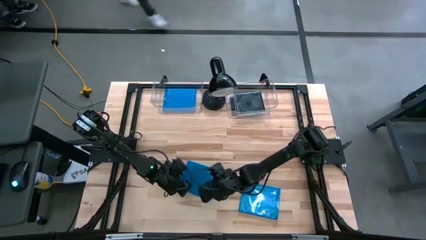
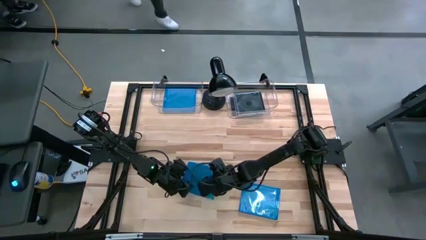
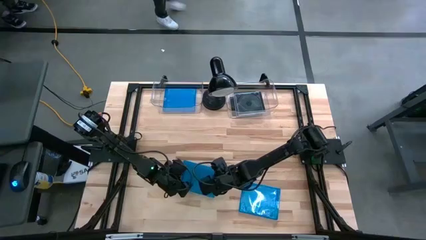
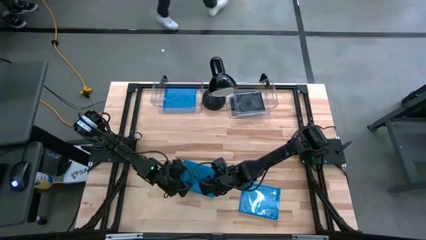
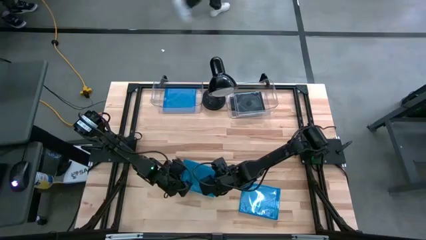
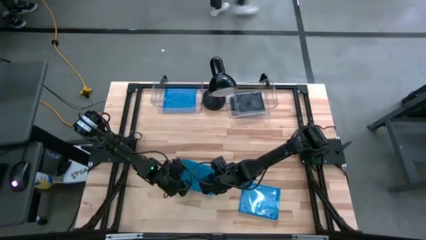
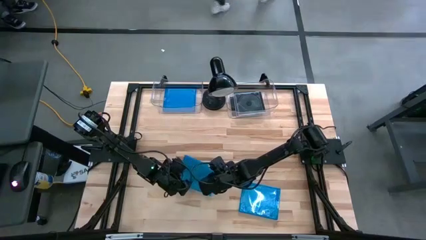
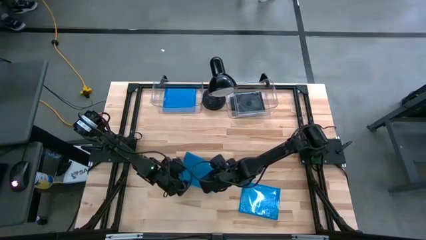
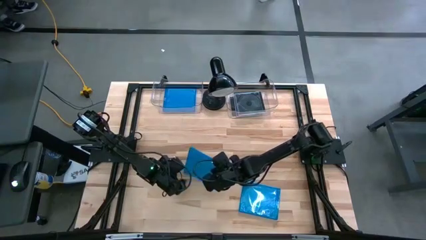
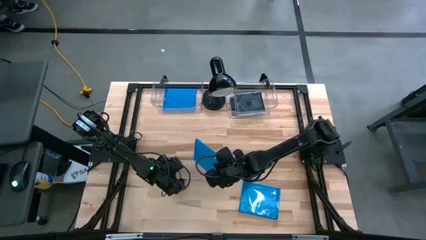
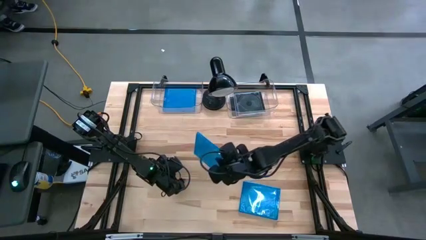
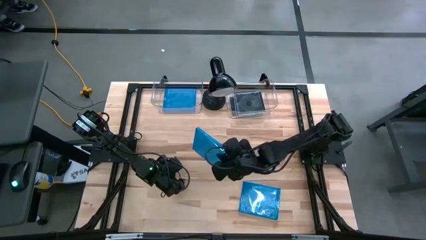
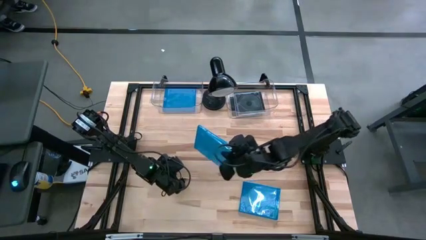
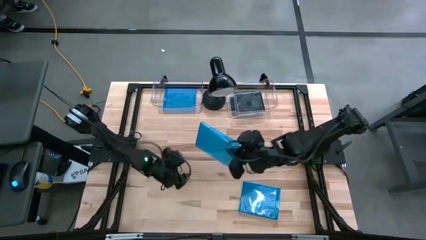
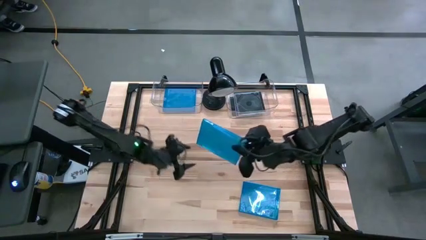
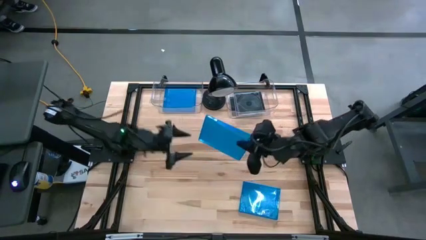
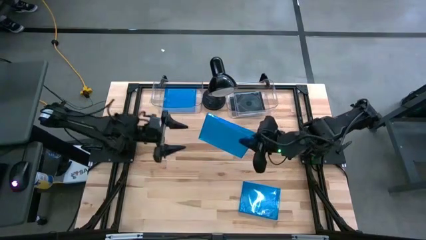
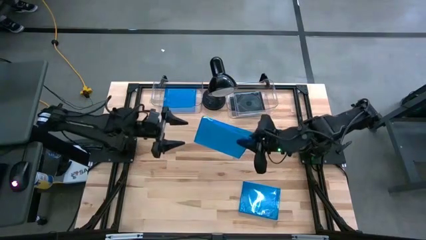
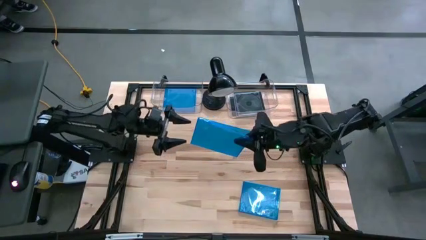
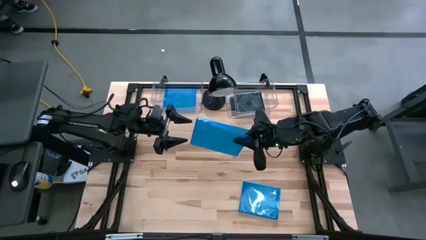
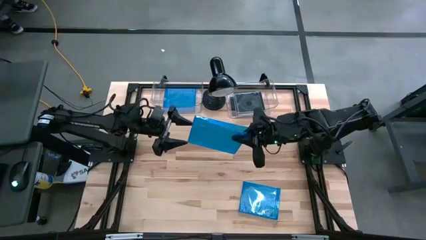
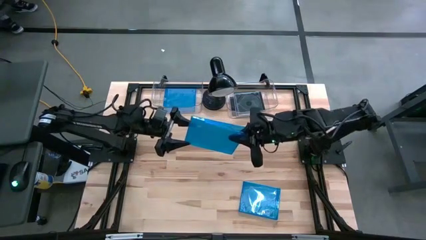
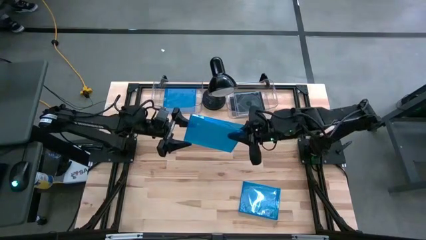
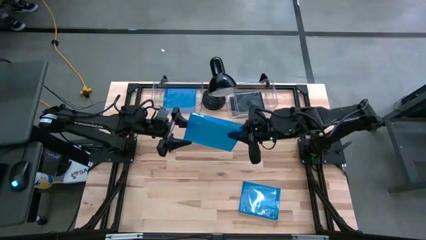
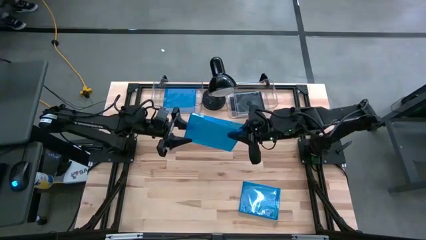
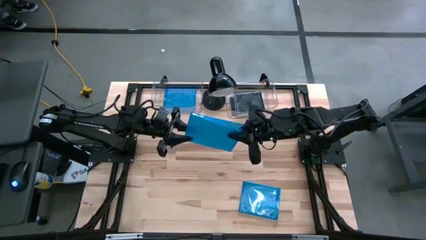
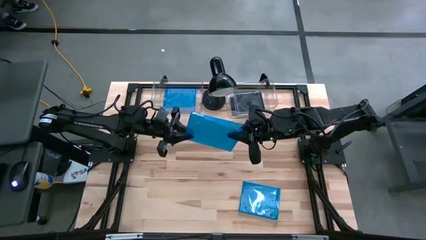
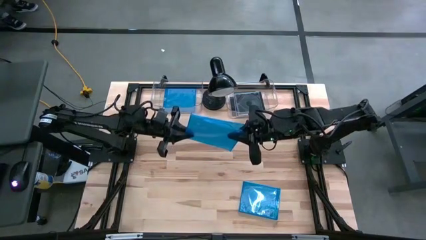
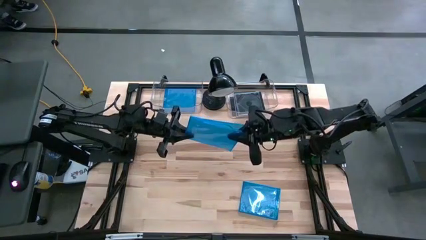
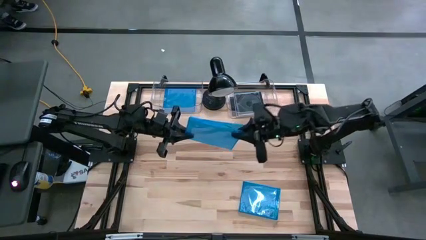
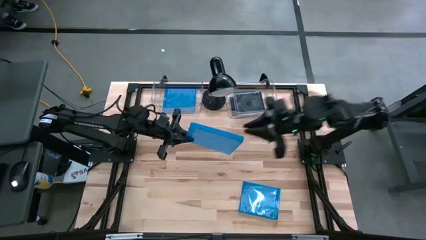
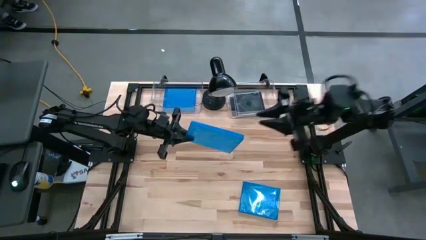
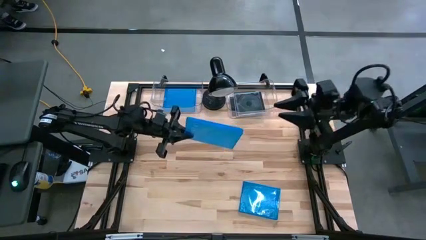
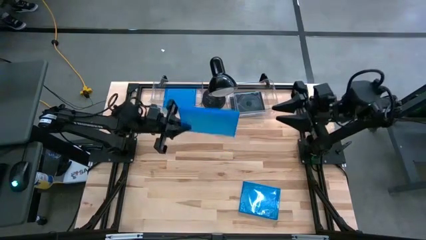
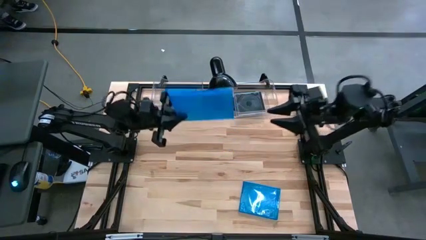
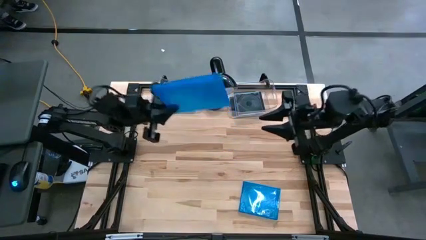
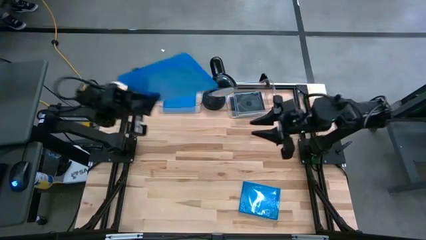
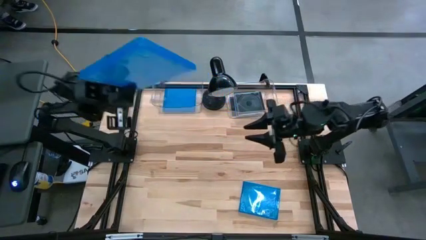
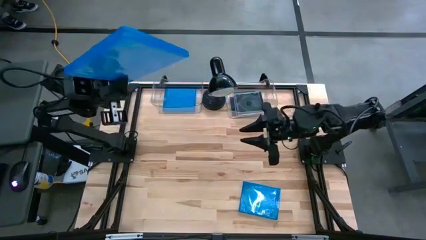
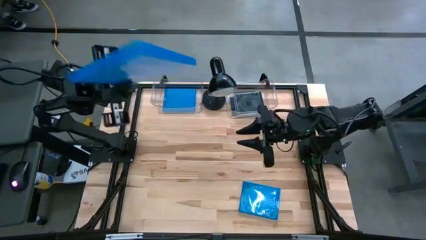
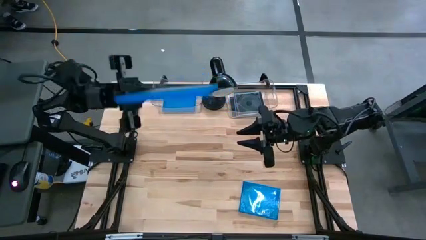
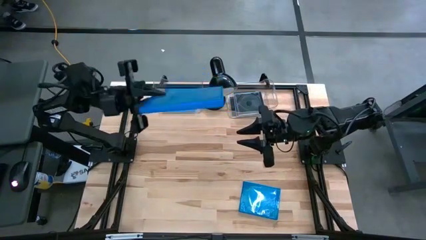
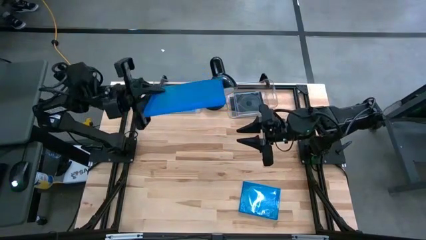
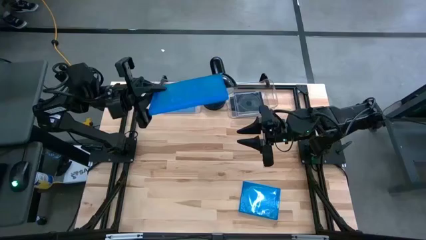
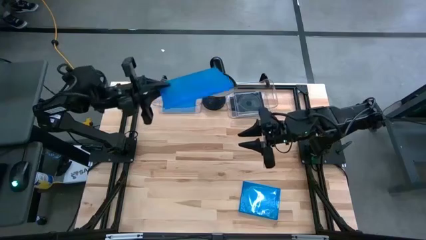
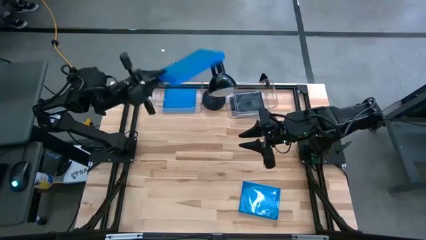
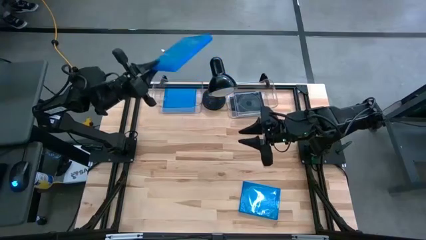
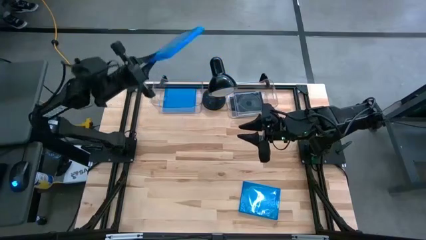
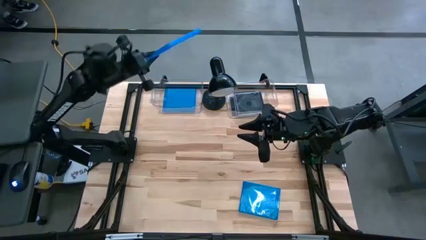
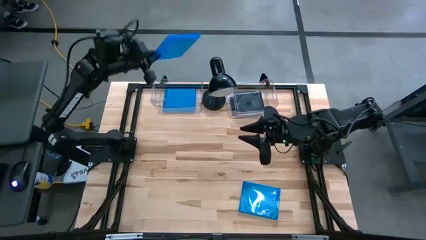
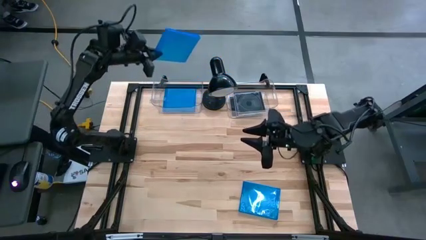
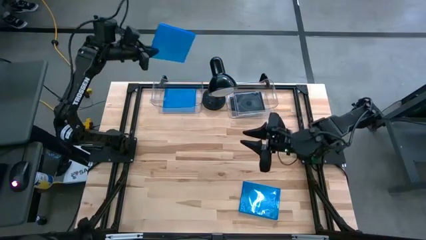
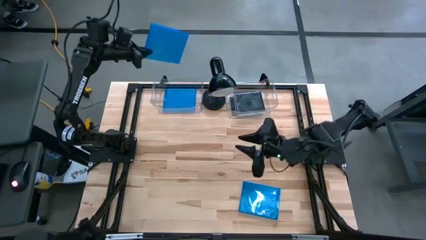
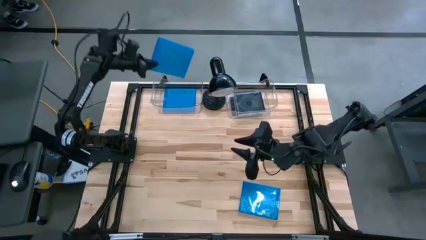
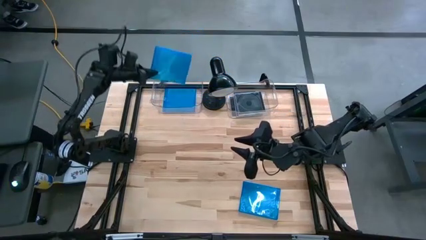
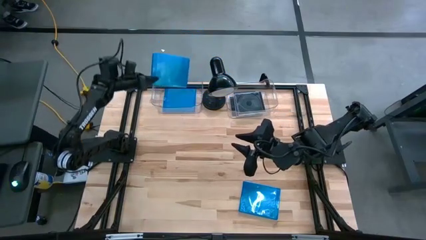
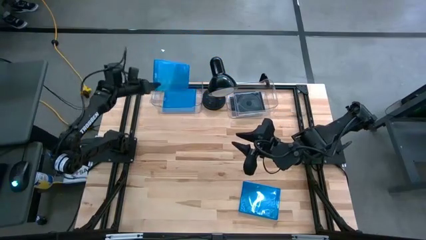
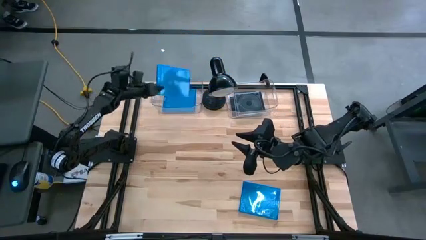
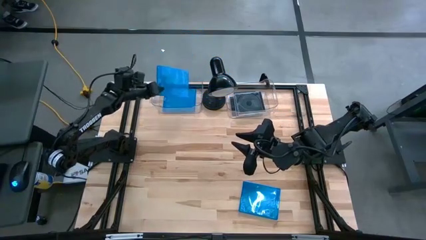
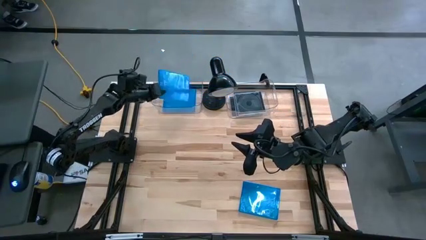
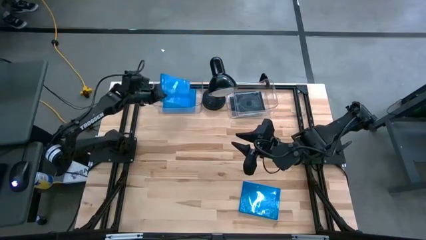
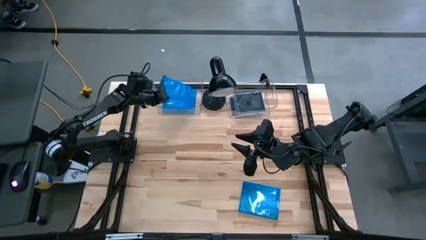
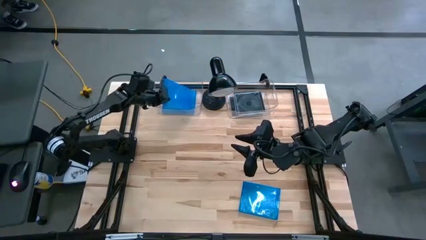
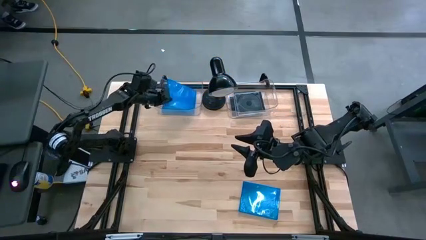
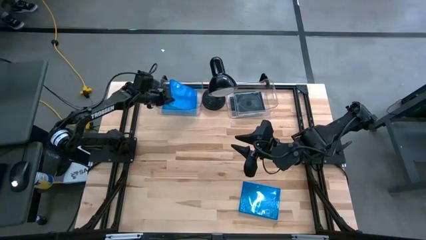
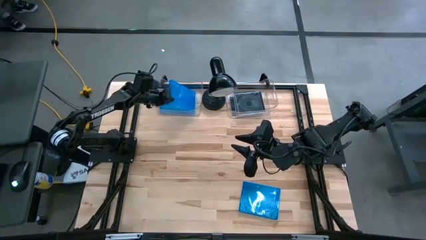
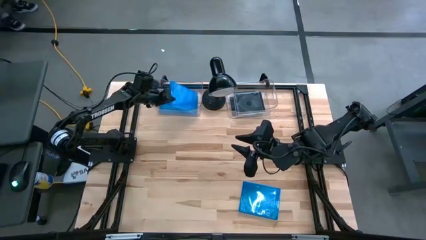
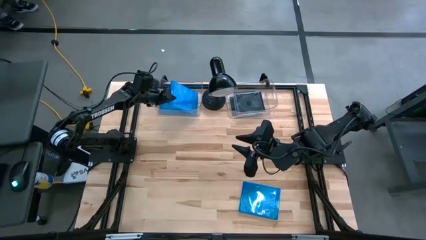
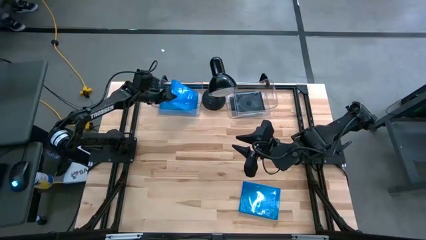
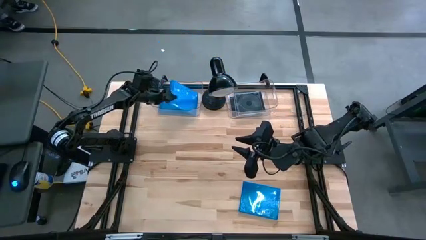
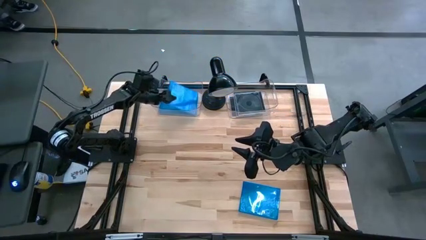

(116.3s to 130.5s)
Task: Pick & place jewel cases by type
Put the left blue CD case into the left transparent bin

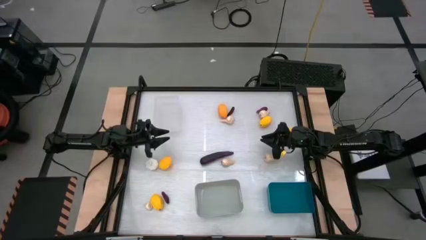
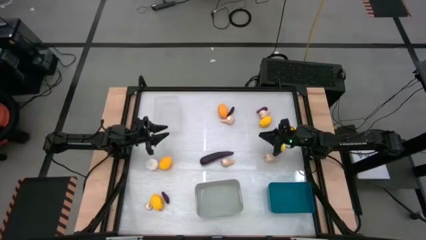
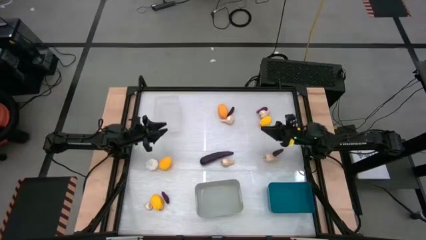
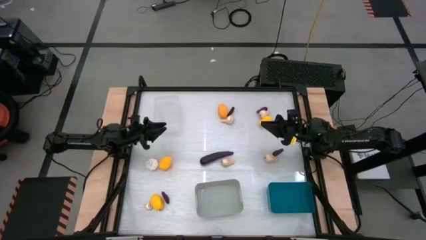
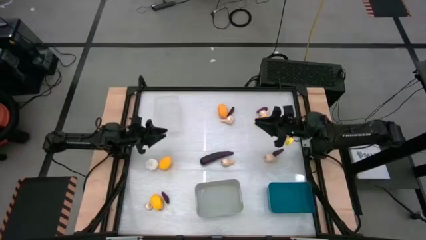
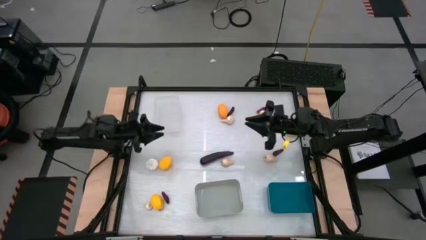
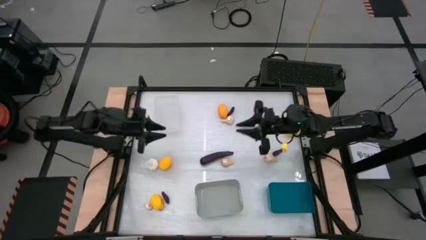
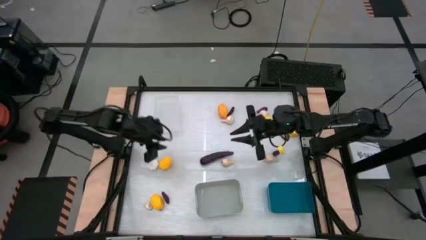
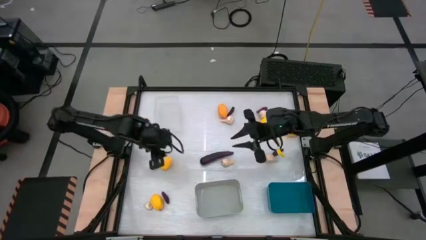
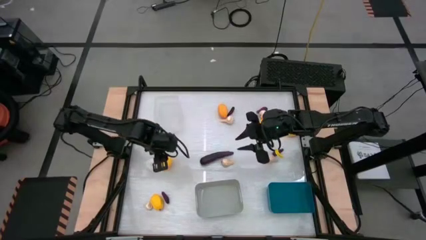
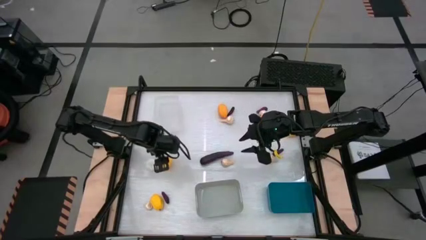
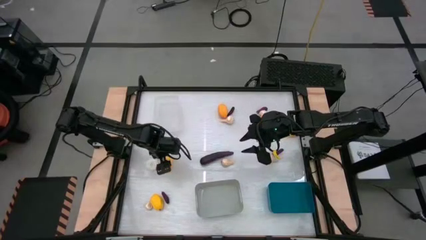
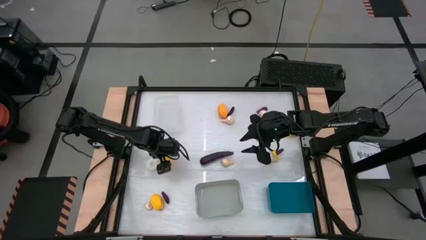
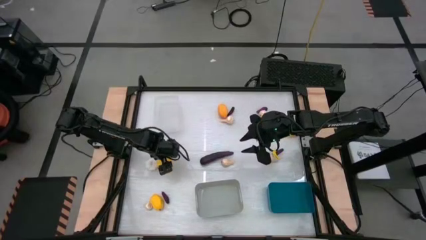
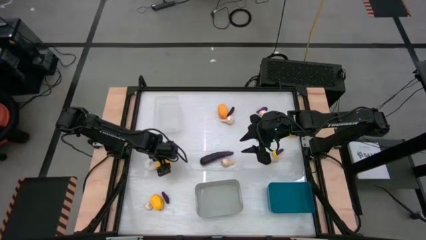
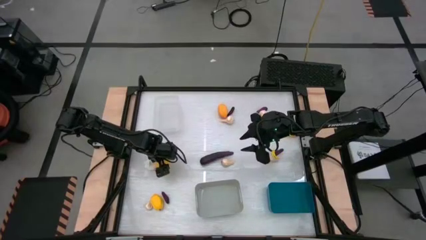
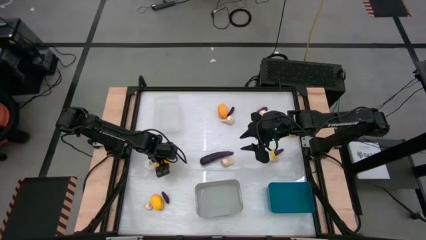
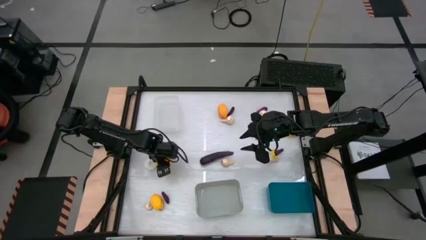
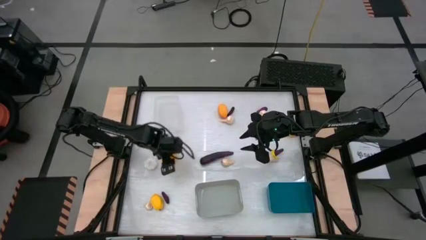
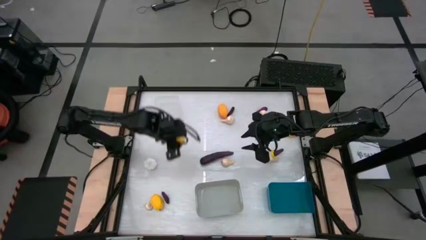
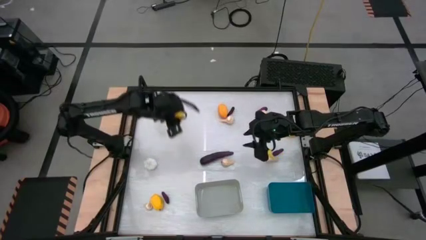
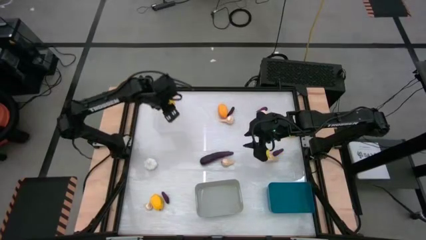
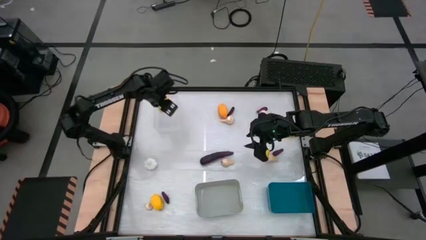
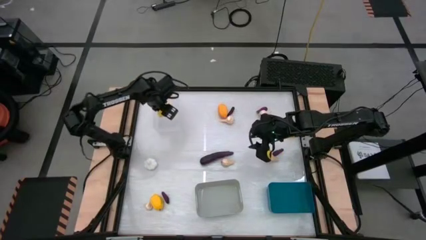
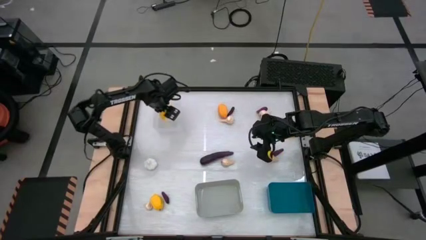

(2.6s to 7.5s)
Task: Sort produce into baskets
Put the lemon into the transparent bin
